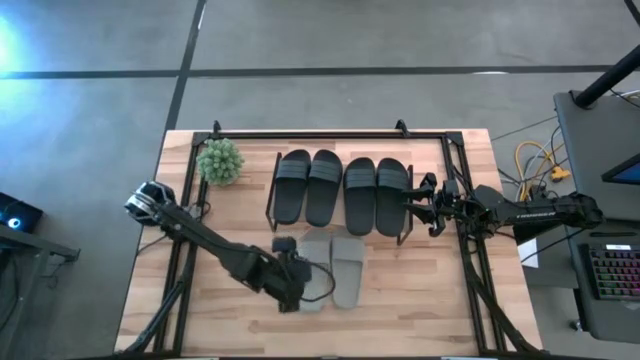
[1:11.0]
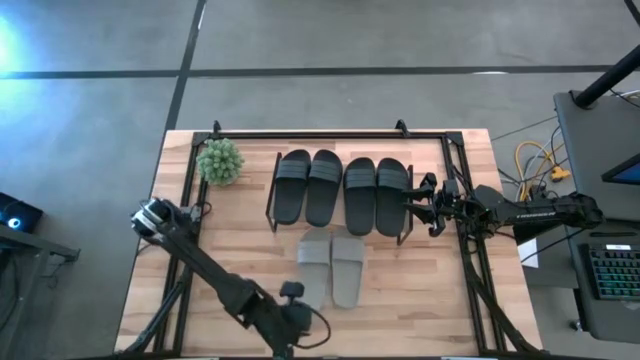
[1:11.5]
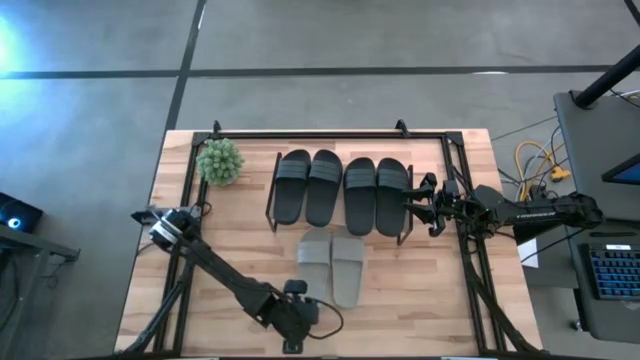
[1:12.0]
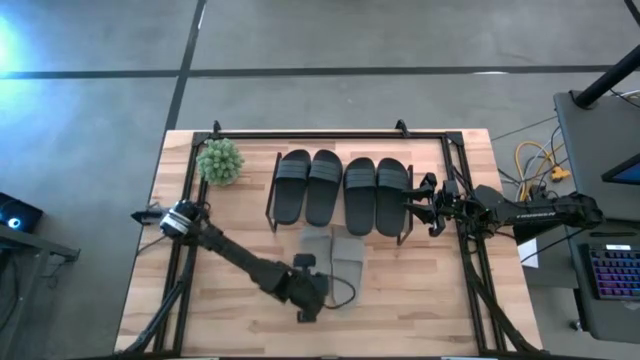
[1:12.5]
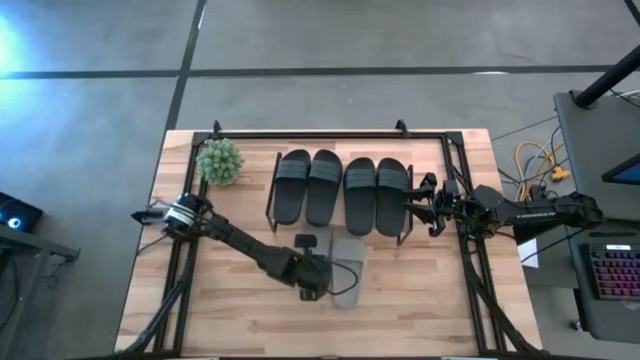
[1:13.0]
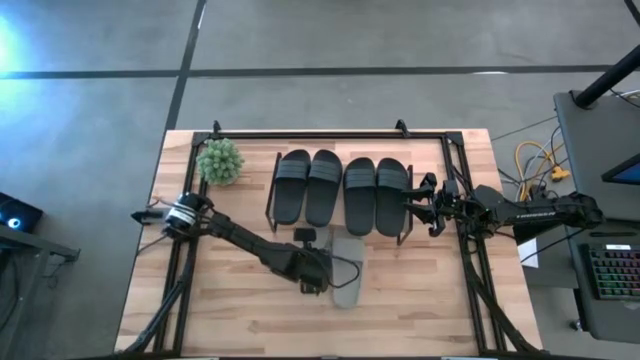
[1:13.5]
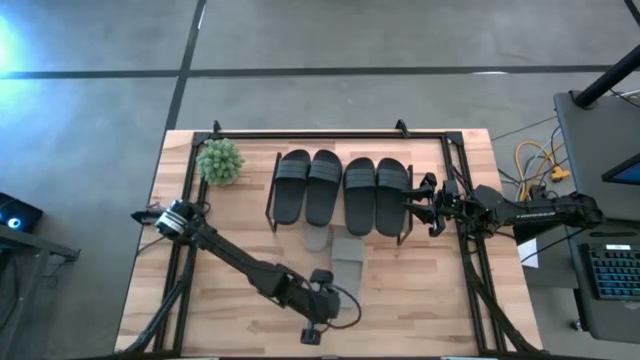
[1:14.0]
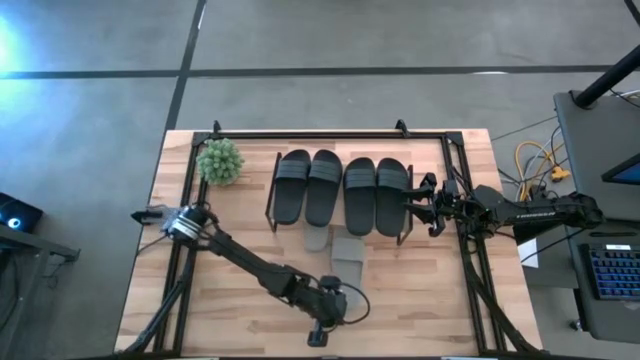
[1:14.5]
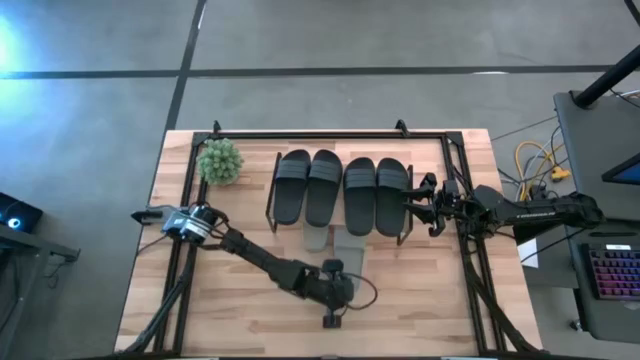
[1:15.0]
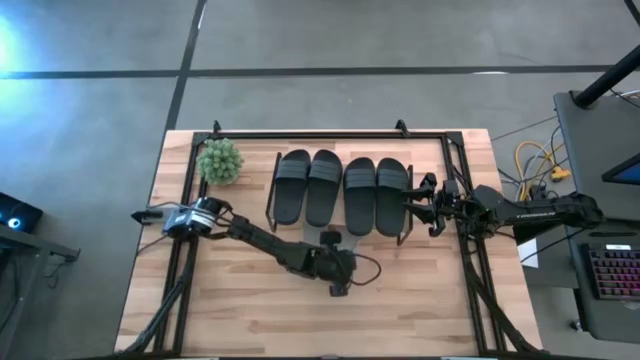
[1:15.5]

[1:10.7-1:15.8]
Task: Pick and place slides into the shelf
Adjust the gray slippers under the shelf

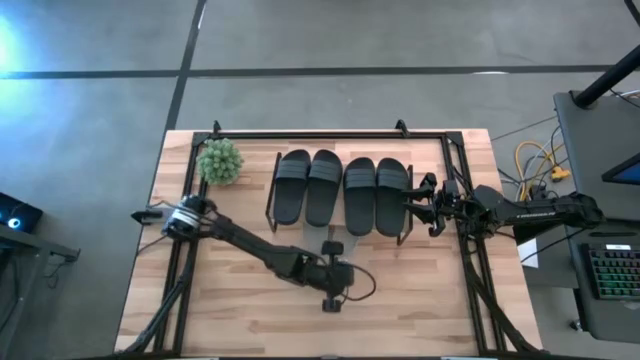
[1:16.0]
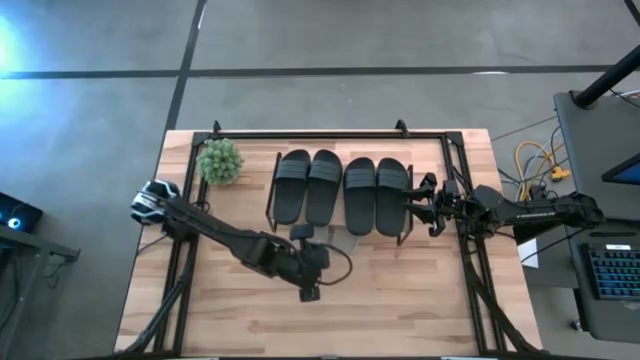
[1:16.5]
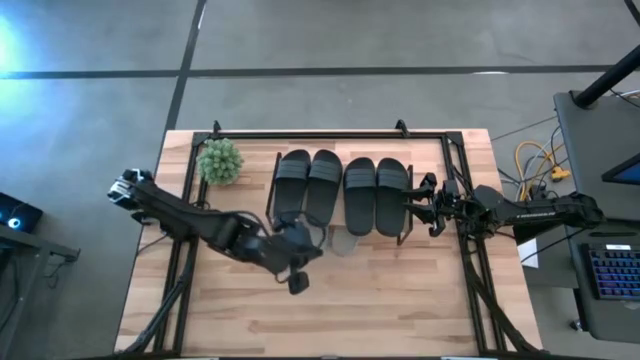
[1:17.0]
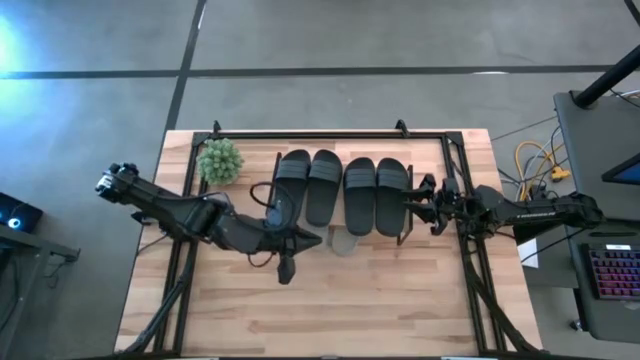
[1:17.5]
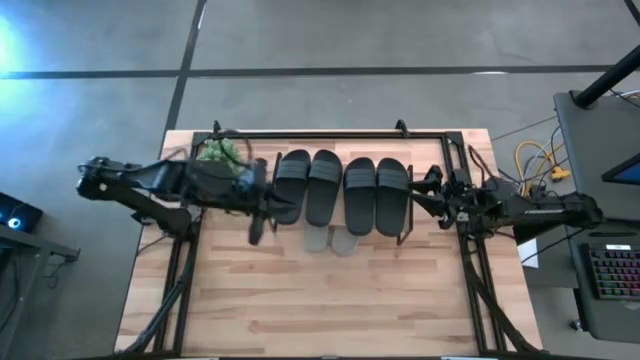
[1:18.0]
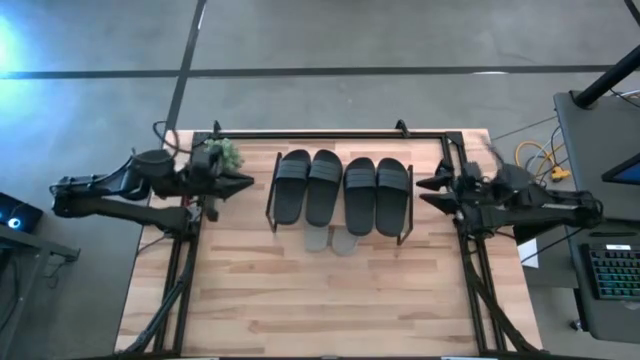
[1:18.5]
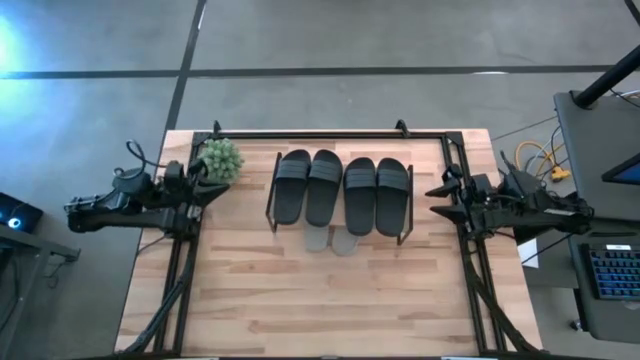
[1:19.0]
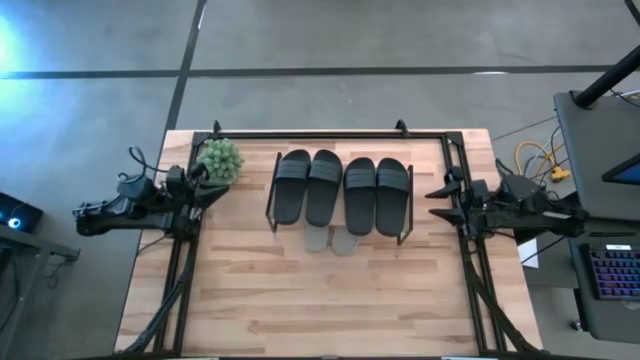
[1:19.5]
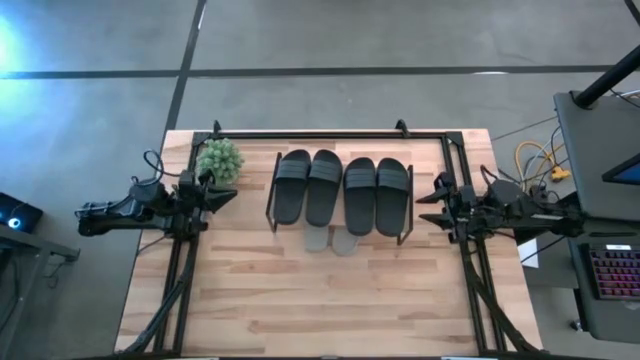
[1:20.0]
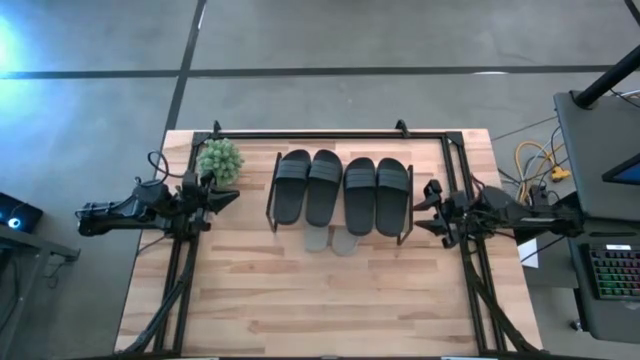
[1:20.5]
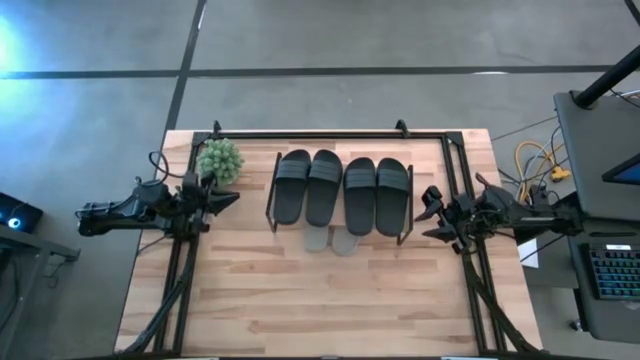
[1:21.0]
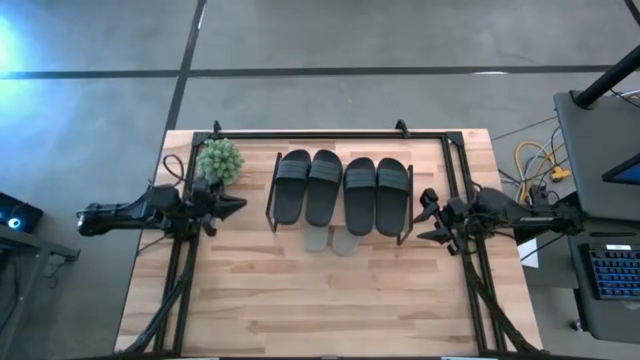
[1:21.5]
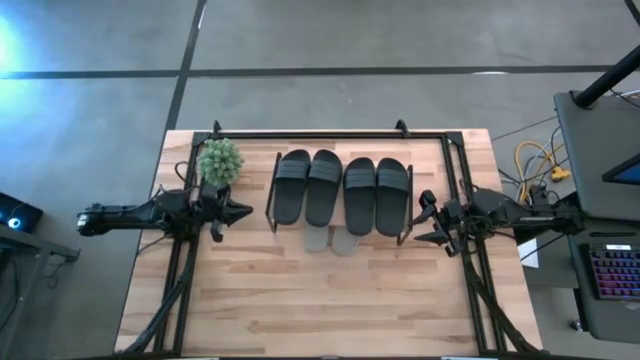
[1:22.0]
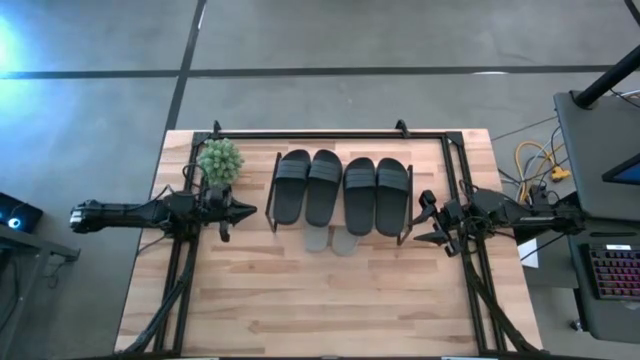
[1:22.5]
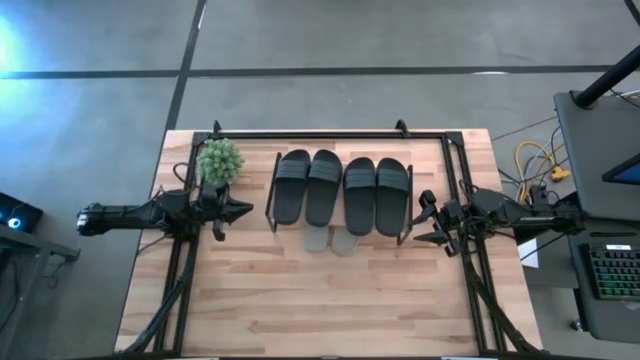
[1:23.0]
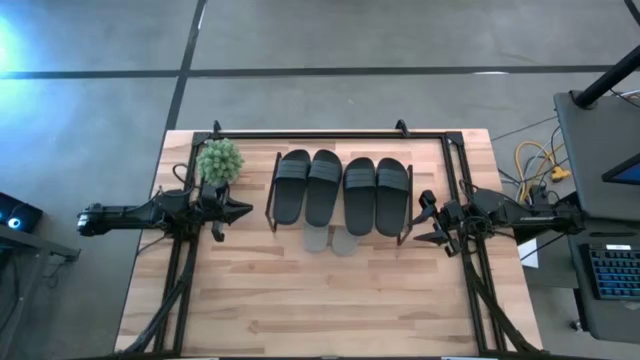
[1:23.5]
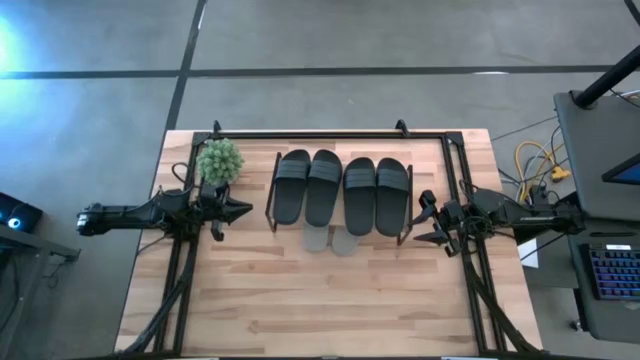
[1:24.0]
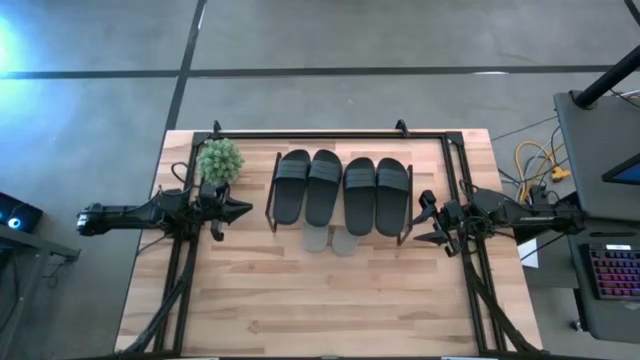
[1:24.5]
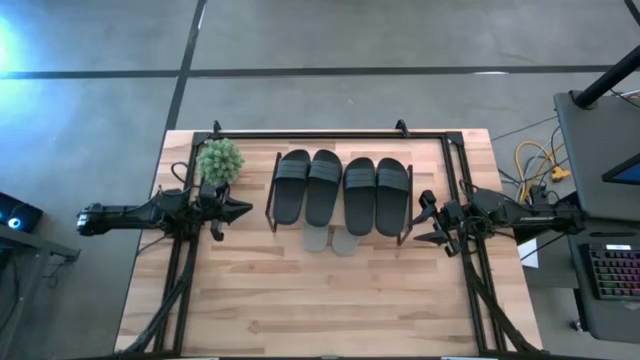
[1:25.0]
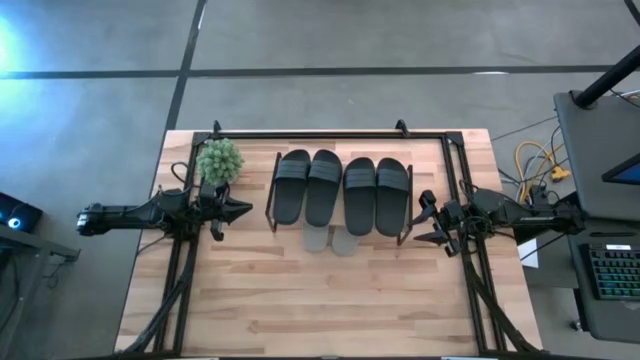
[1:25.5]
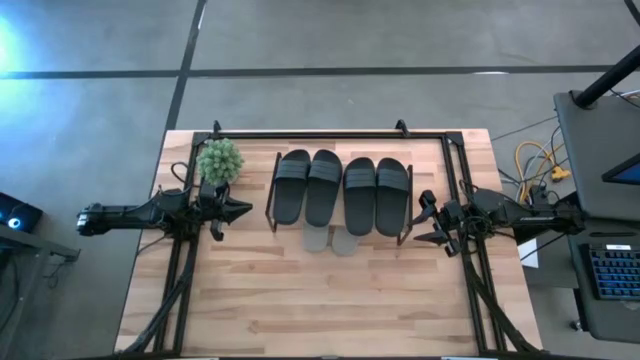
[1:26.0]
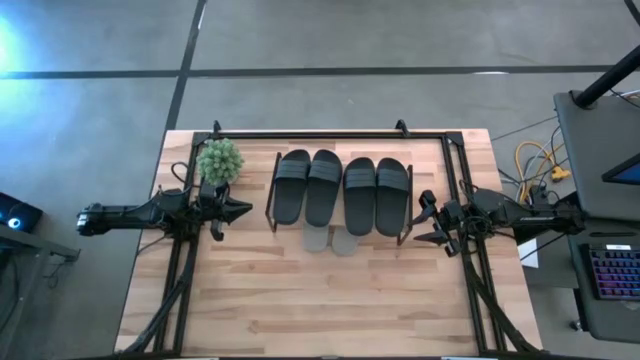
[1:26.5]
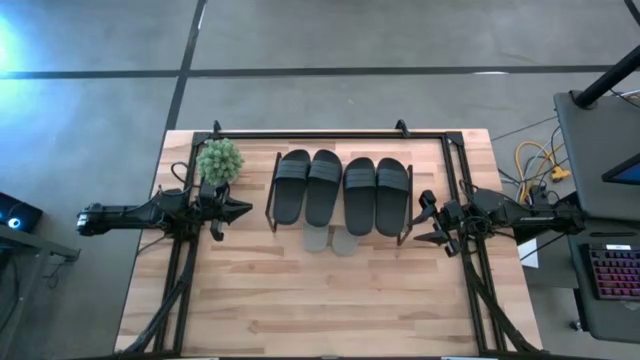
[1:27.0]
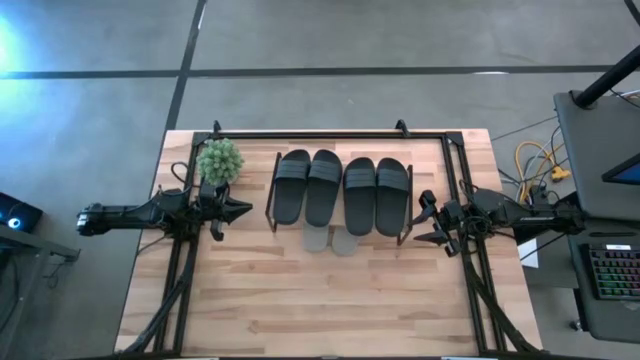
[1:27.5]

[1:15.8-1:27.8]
Return to Home Position

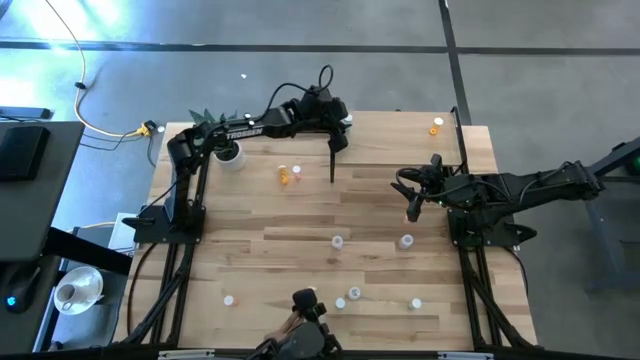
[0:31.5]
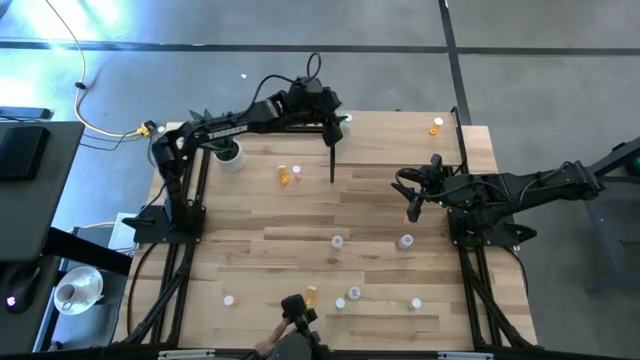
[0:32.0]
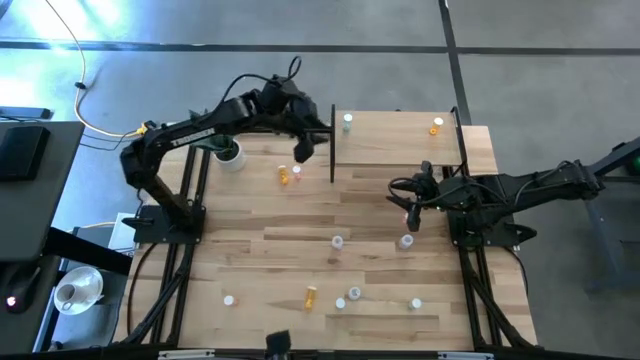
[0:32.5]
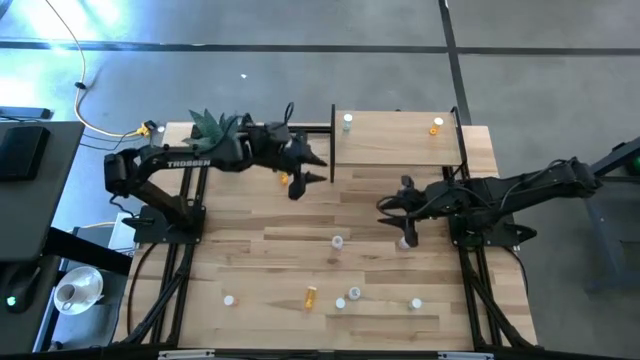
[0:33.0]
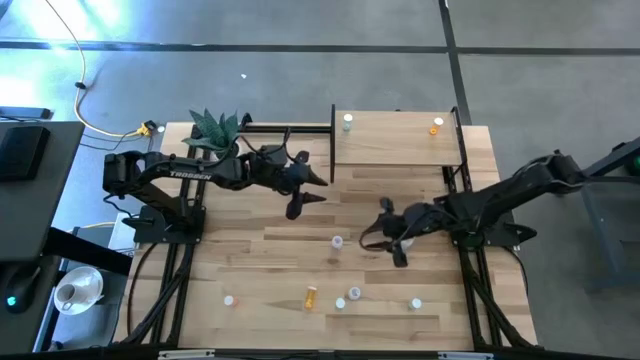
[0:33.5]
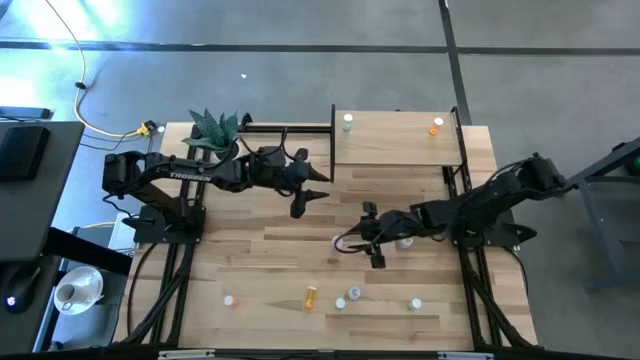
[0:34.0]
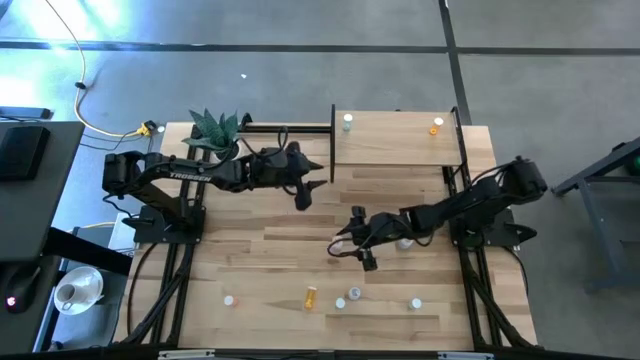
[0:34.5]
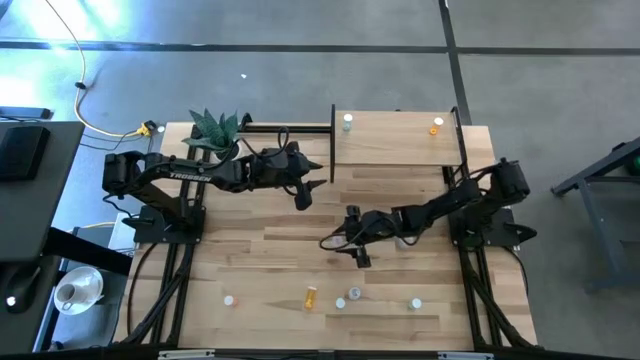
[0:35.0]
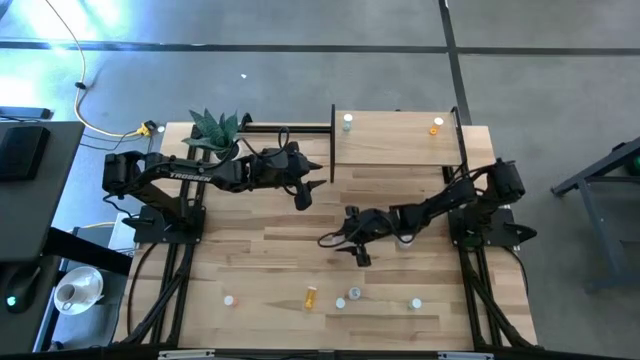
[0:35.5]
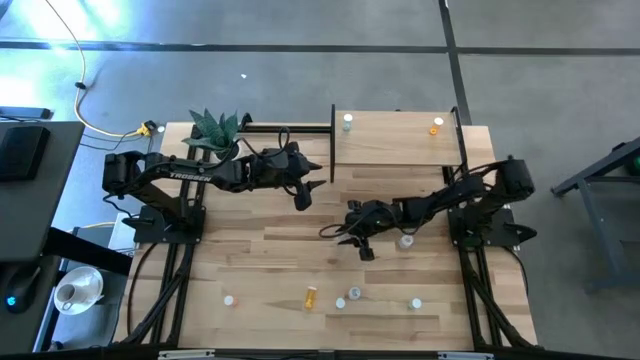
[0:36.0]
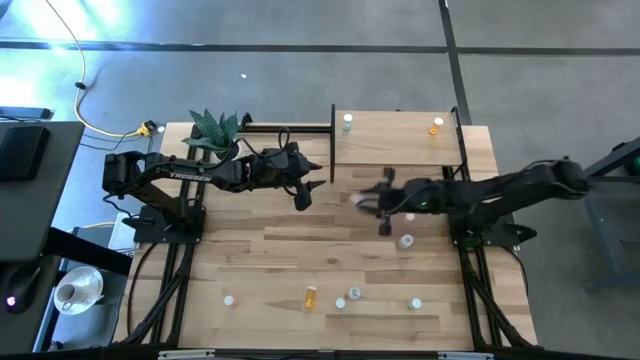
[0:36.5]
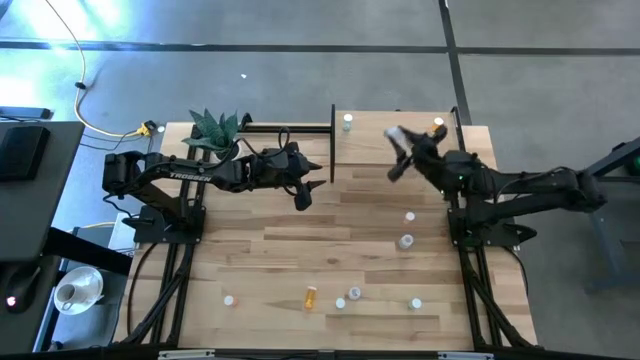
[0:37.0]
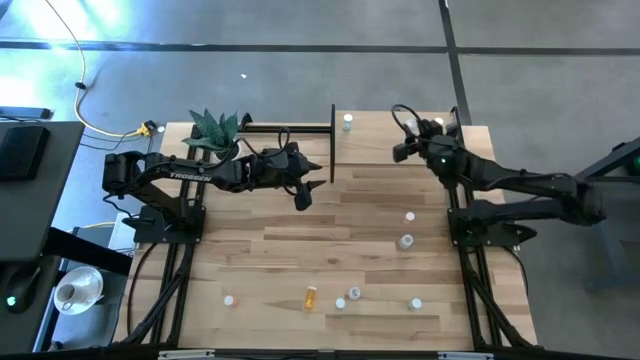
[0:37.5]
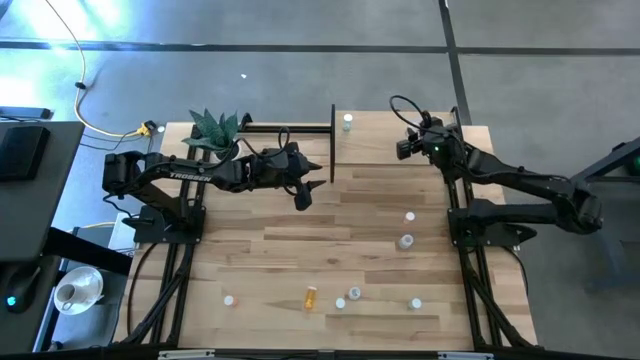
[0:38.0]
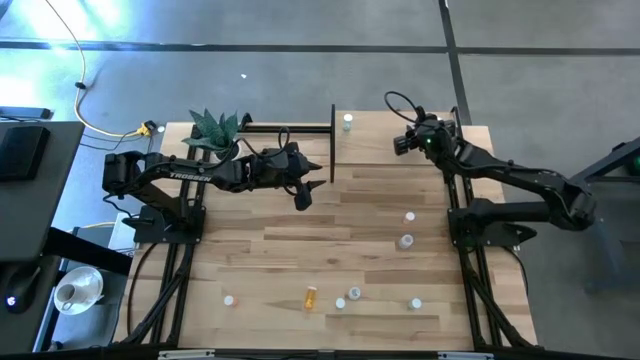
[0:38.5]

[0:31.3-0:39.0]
Task: Pick and place medicine bottles onto shelf by color
Put the top left transparent pill bottle on the shelf
